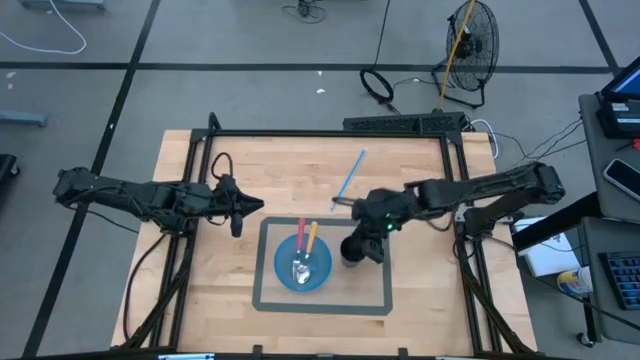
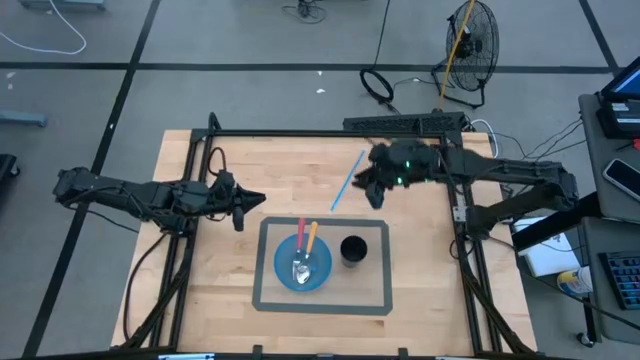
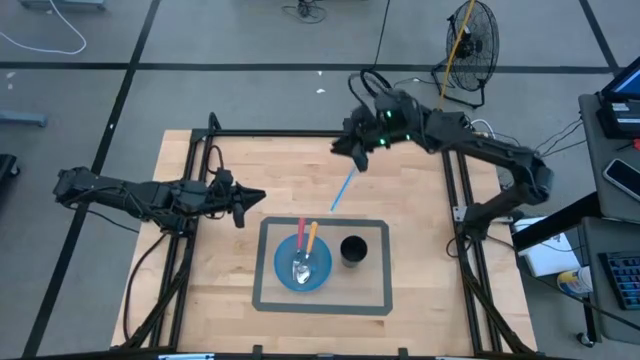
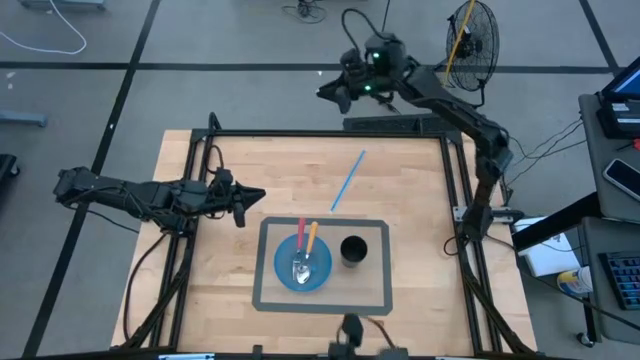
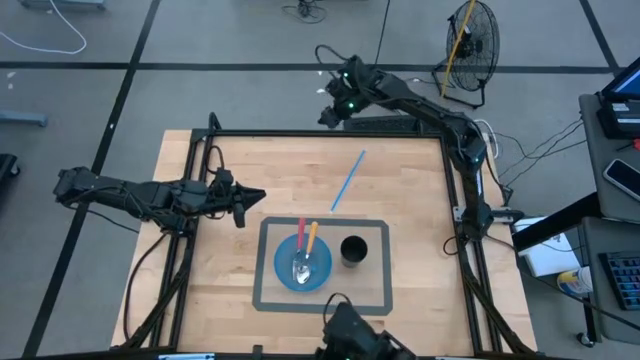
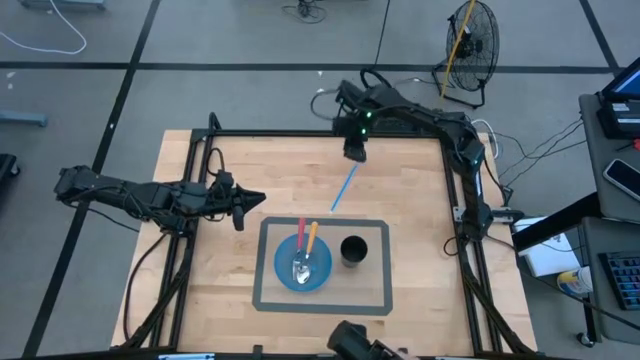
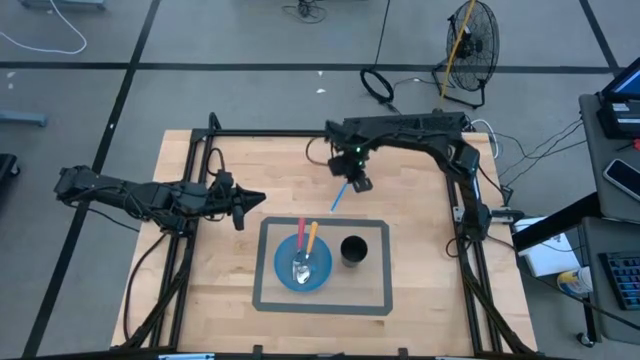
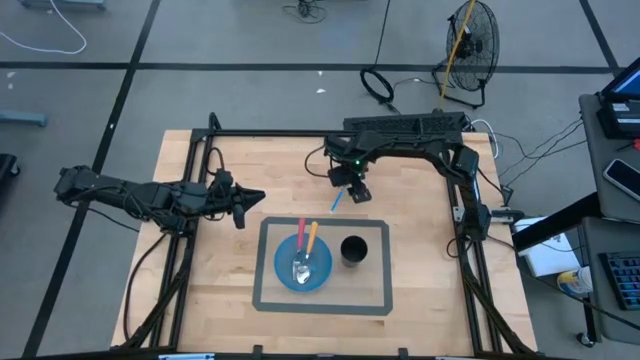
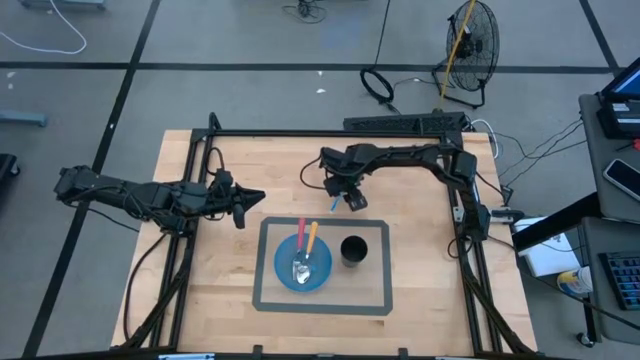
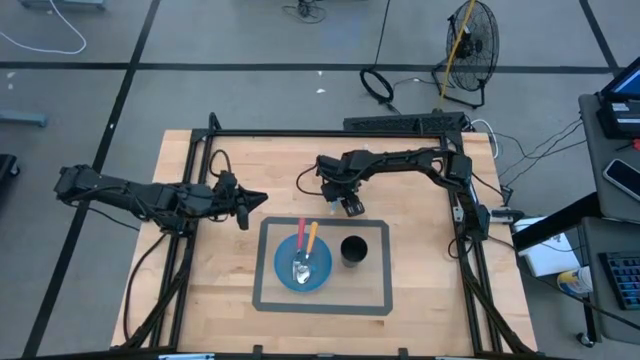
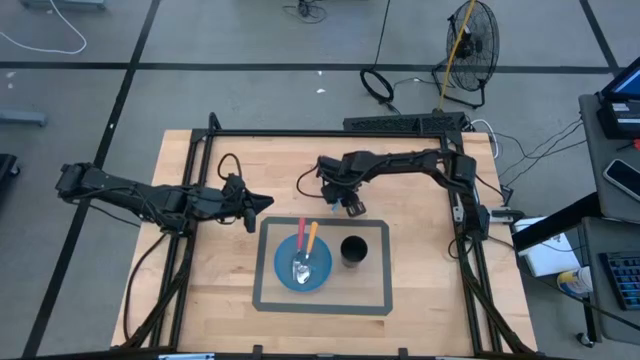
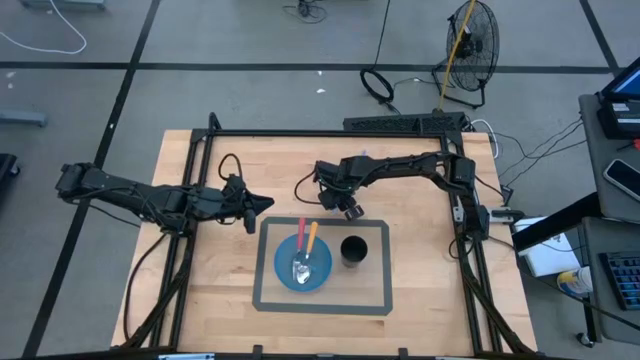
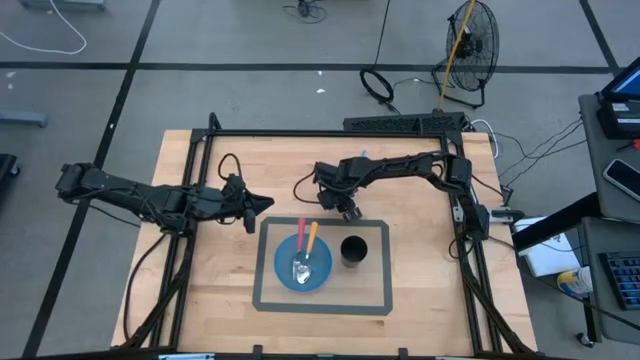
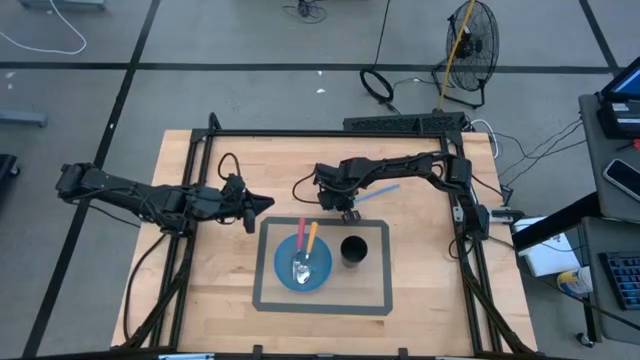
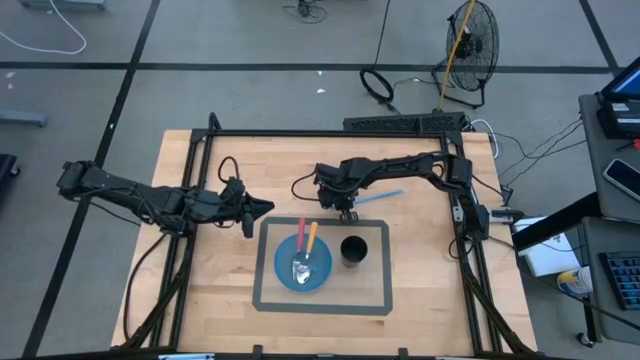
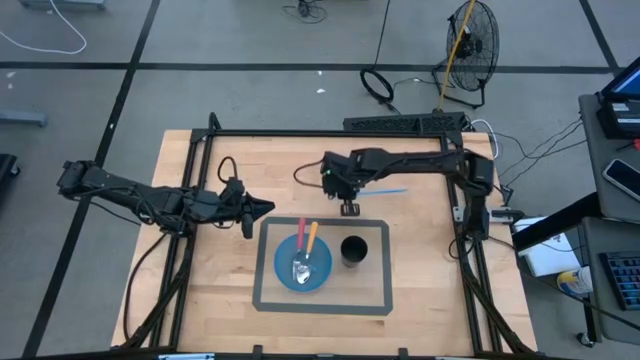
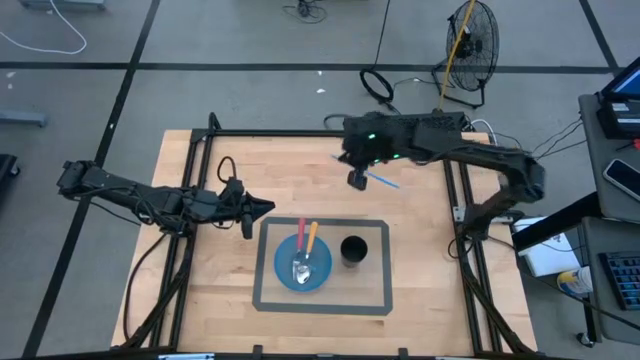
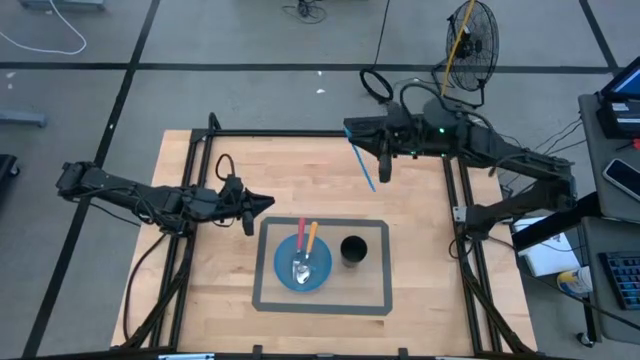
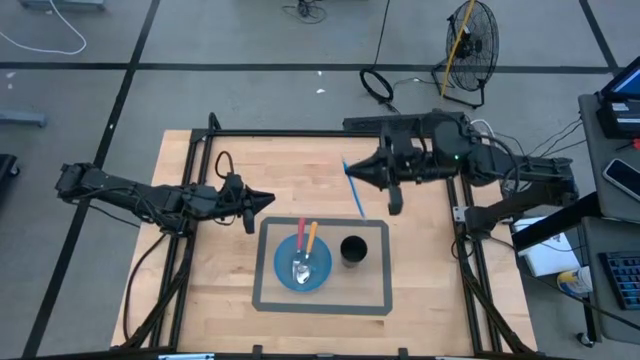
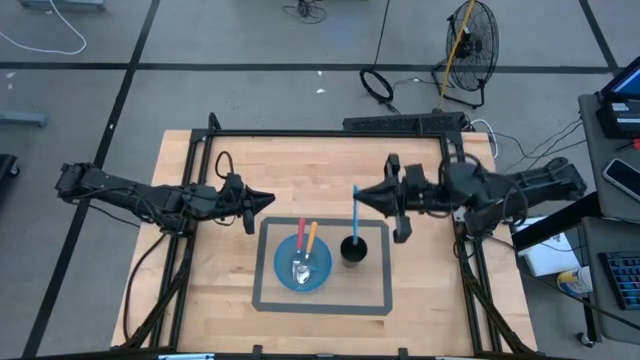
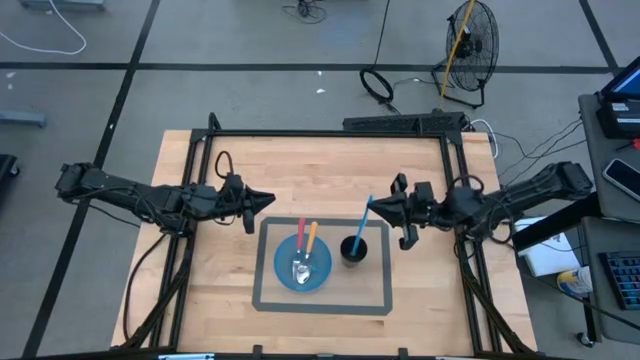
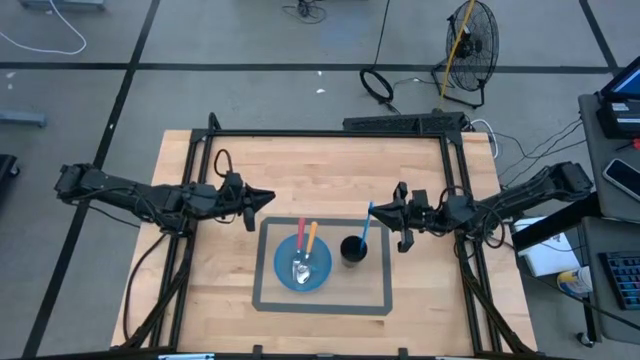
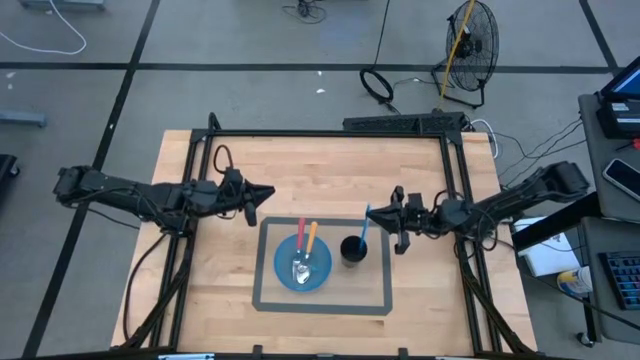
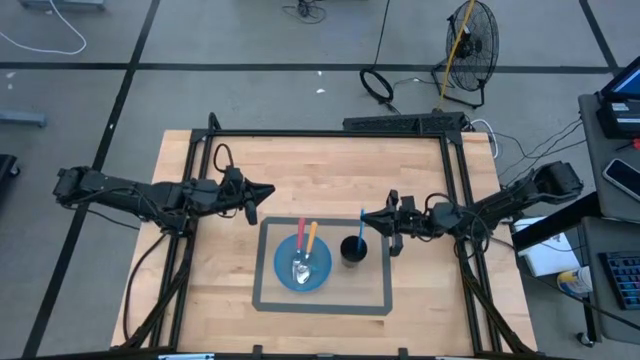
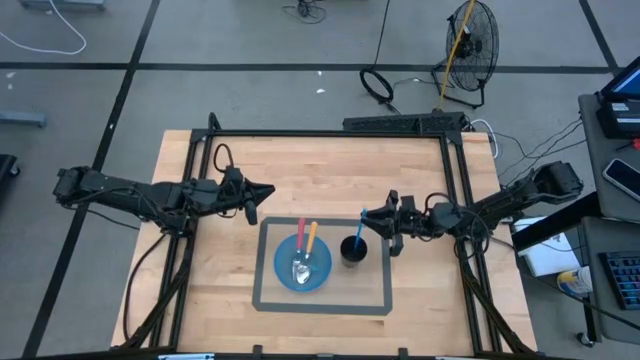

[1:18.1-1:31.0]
Task: Pick & Place Utensil
Put the blue straw into the black cup

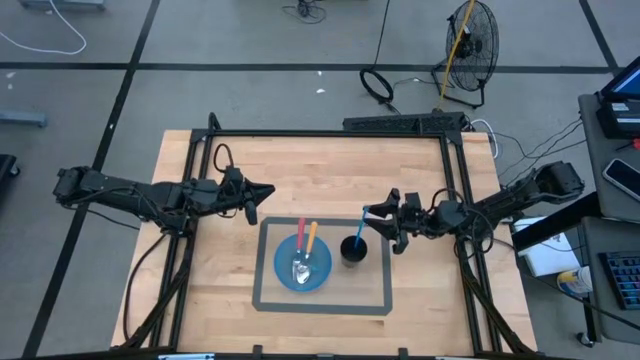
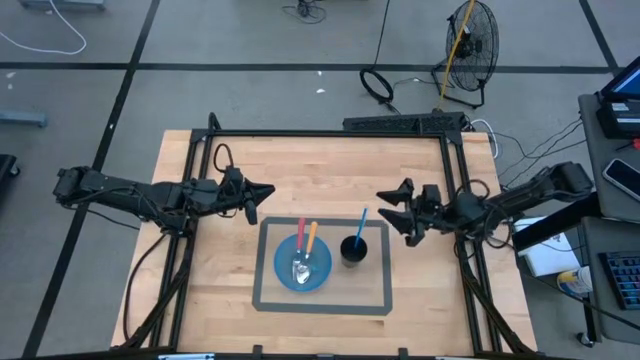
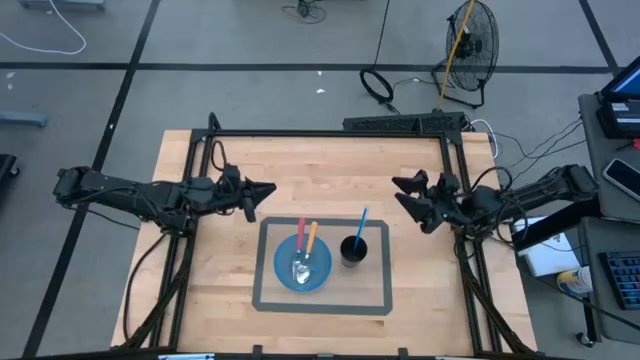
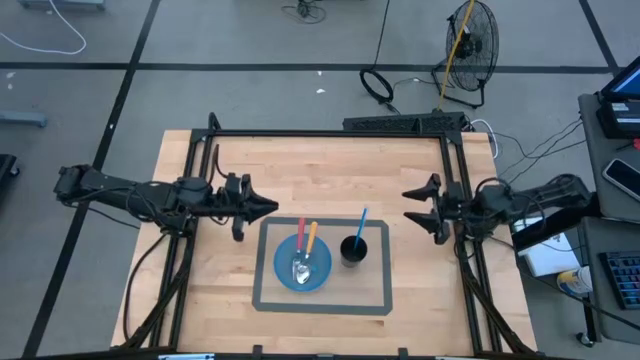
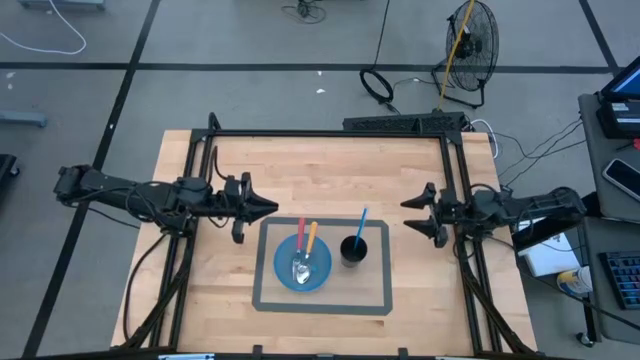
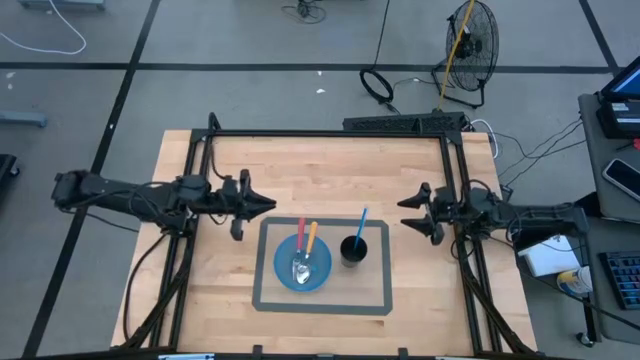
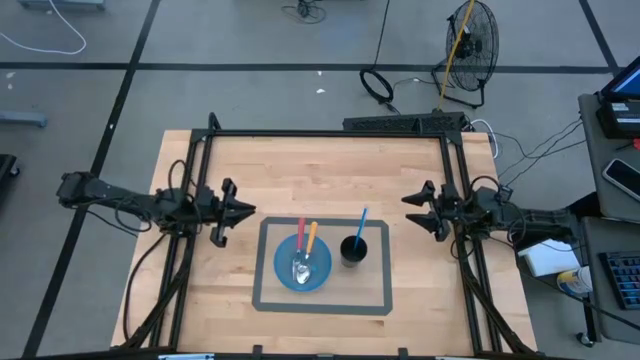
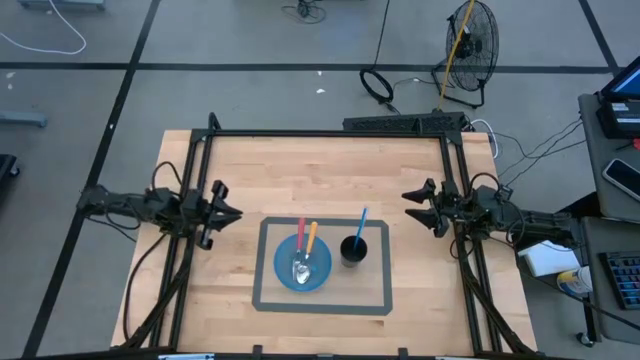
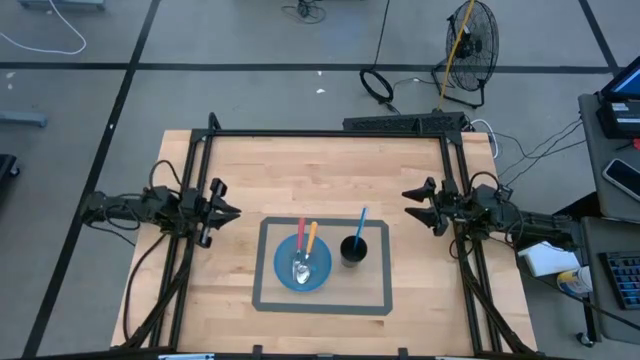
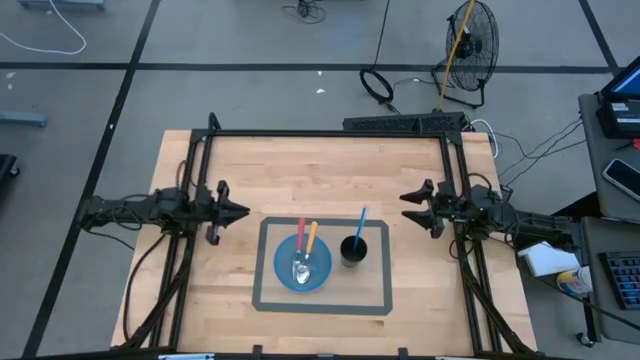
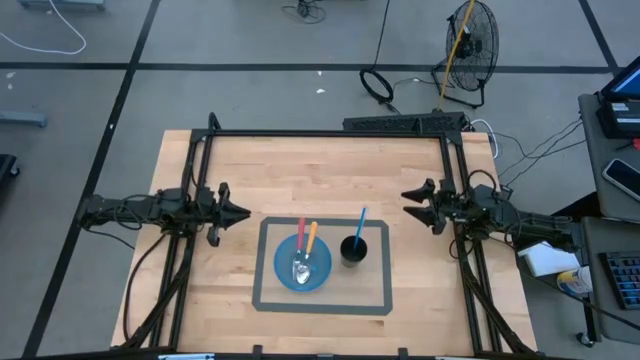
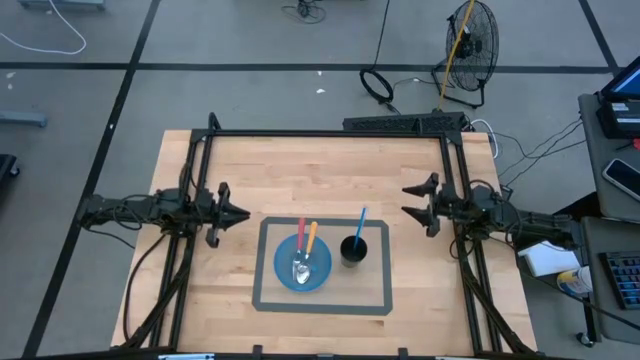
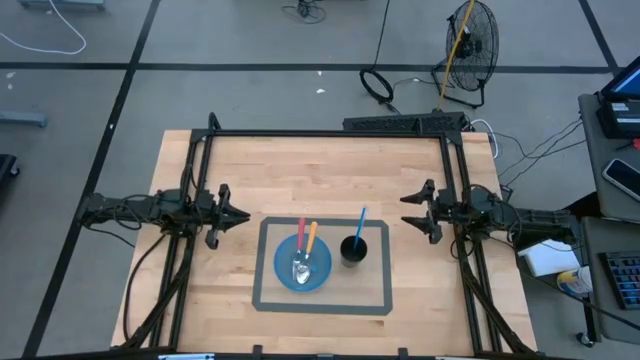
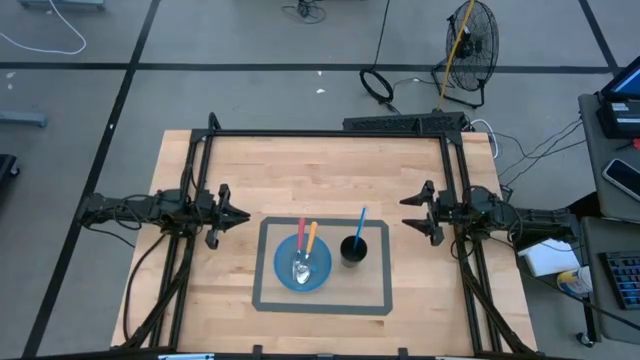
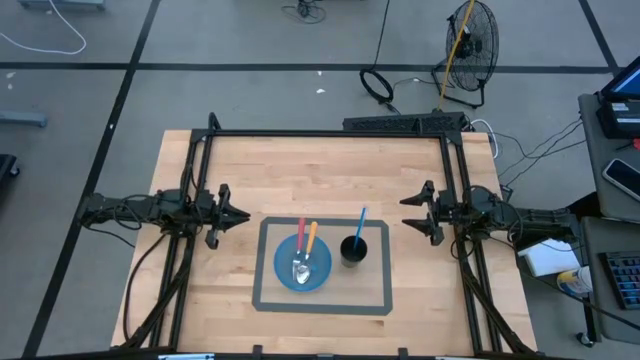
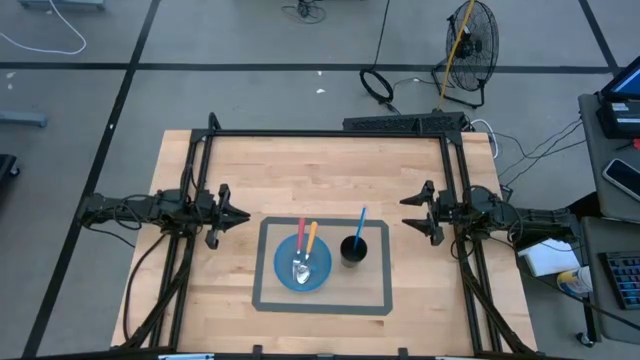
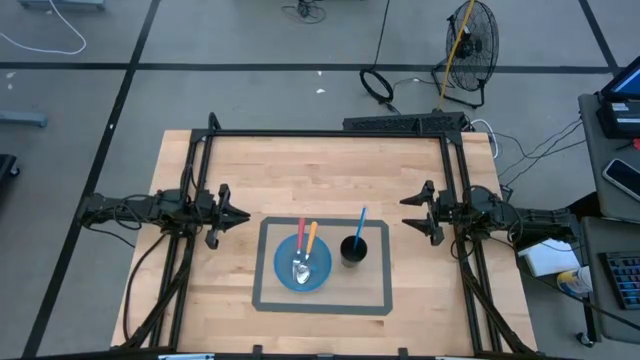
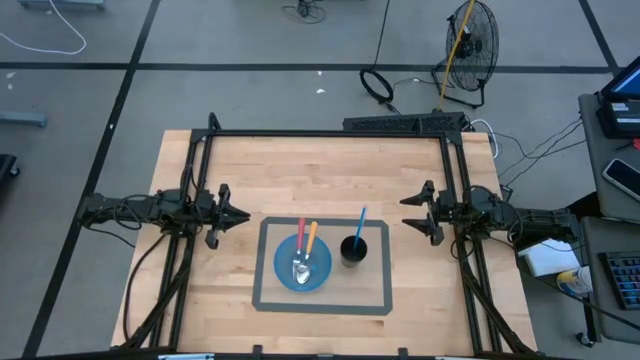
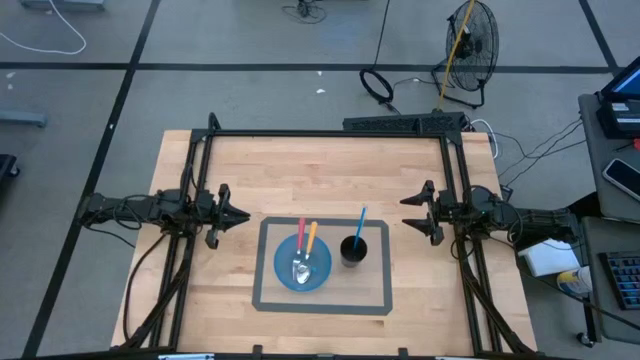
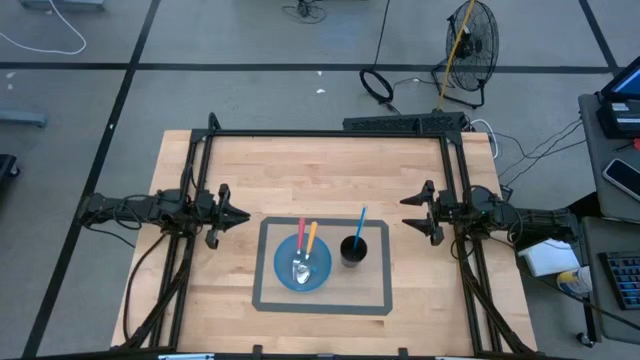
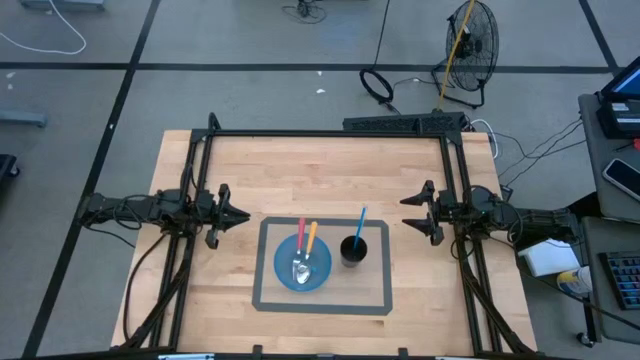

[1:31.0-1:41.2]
Return to Home Position
